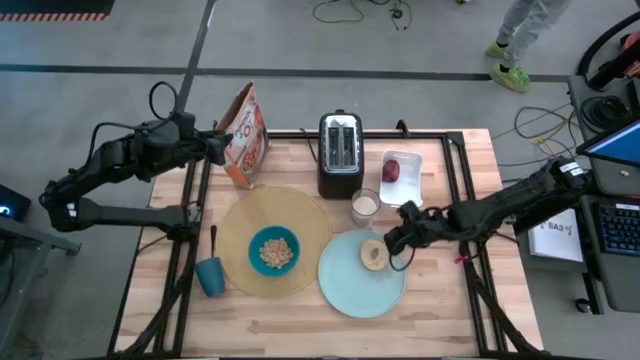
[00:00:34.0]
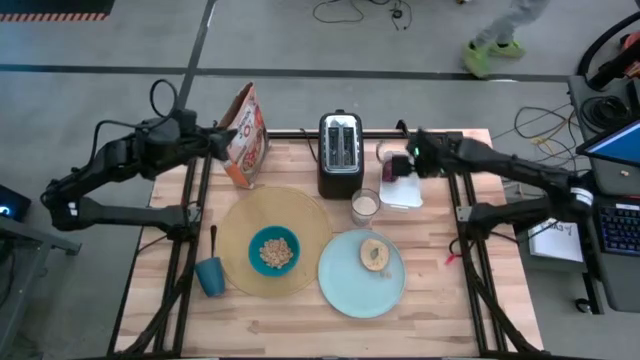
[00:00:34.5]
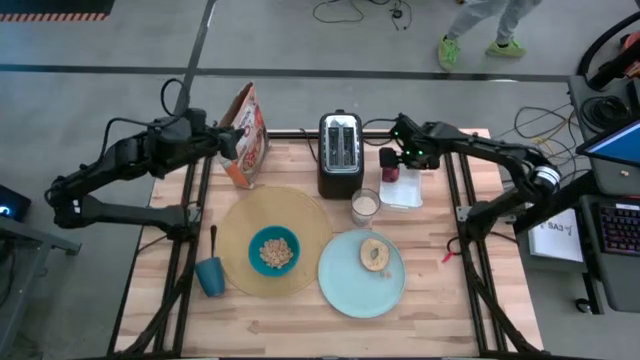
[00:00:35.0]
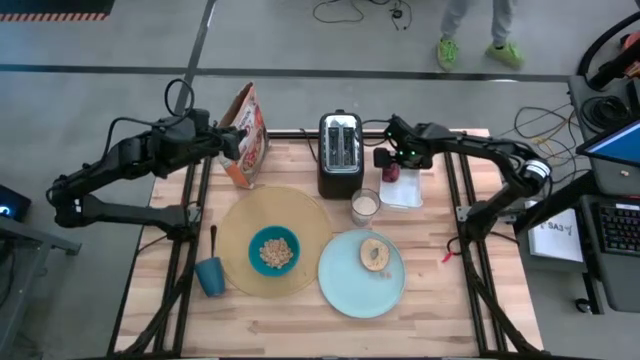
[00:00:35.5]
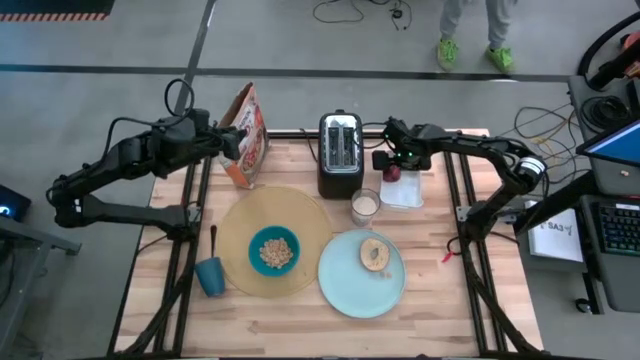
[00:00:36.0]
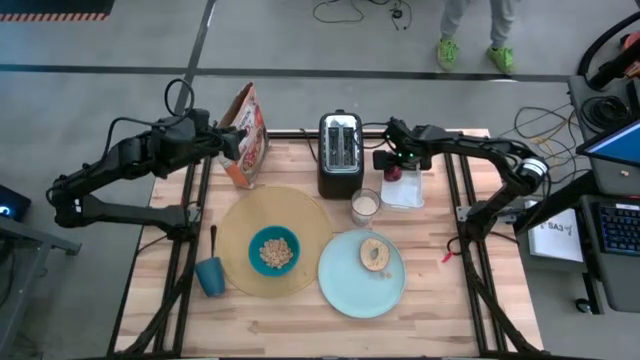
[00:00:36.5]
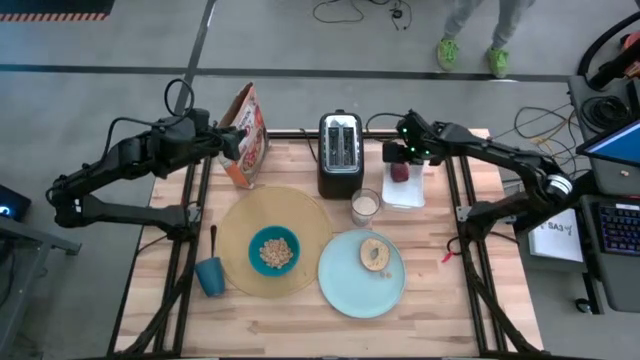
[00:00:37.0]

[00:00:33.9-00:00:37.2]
Task: Arrange a breakfast setting
Put the red apple on the light blue plate

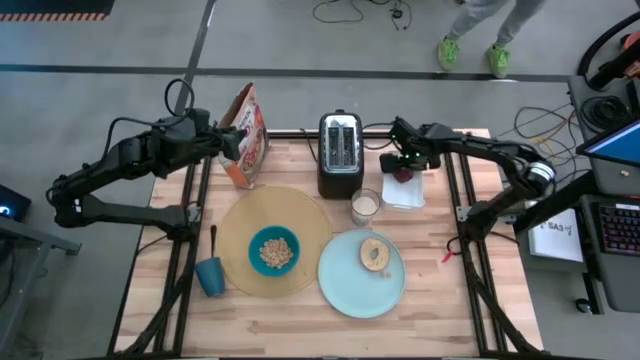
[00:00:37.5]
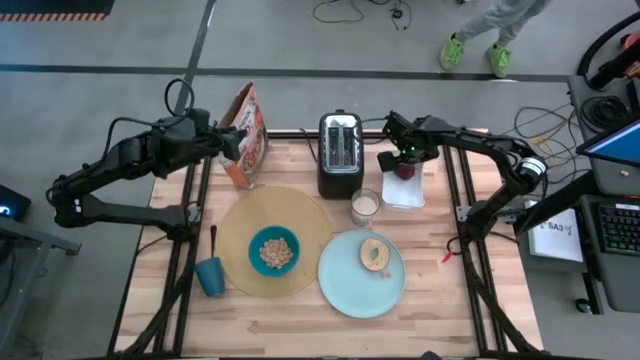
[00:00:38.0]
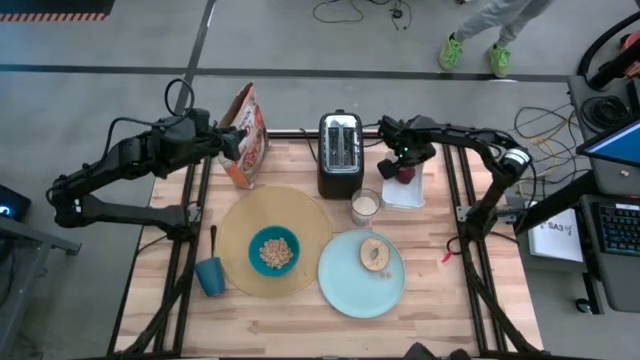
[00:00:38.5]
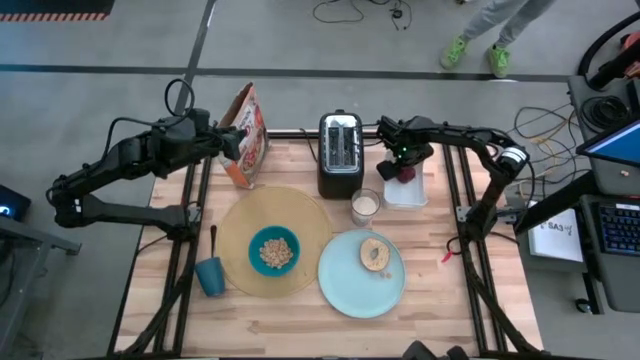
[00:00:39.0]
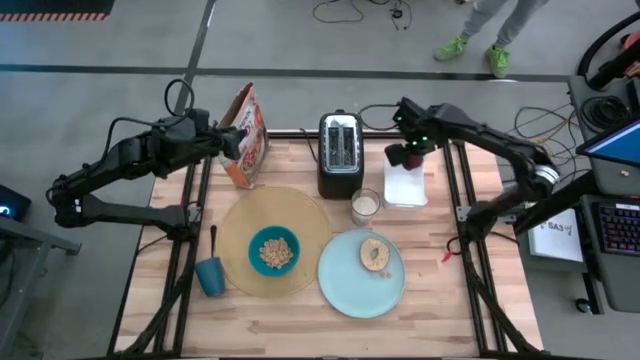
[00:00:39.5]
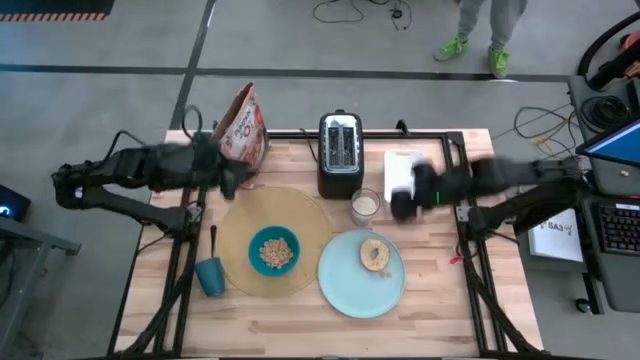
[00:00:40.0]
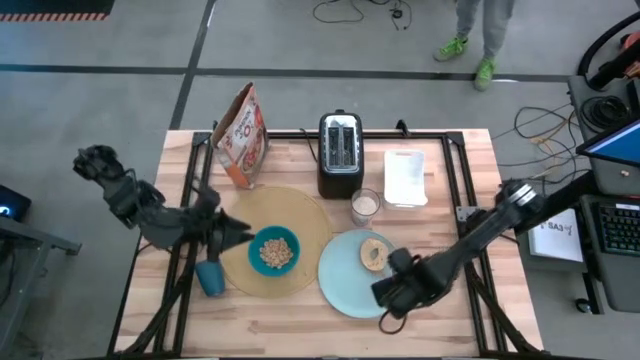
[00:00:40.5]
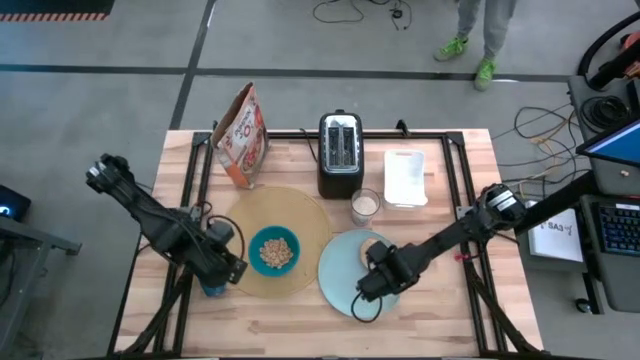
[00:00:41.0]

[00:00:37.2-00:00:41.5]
Put the red apple on the light blue plate

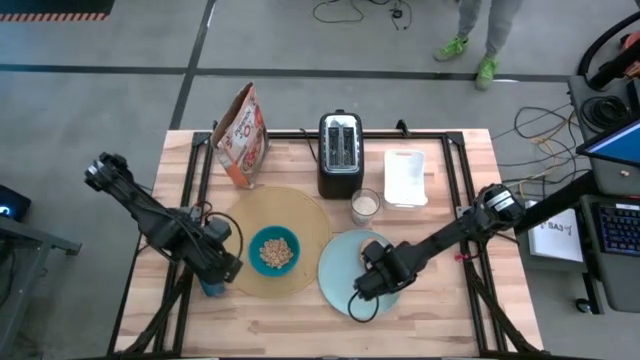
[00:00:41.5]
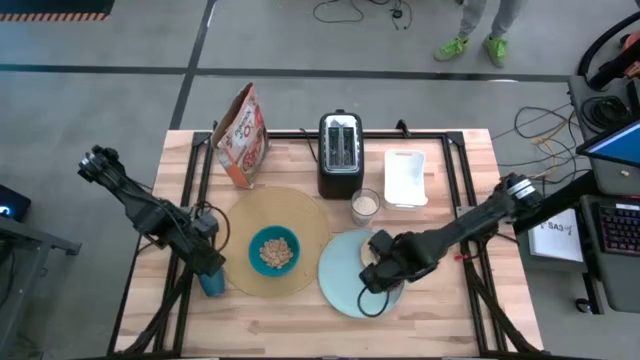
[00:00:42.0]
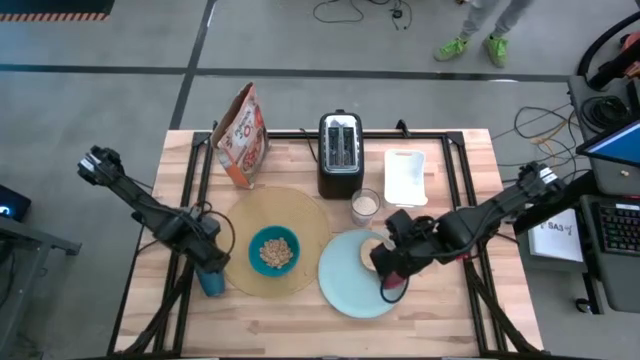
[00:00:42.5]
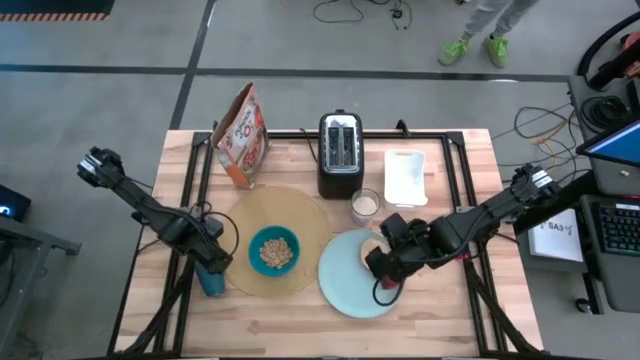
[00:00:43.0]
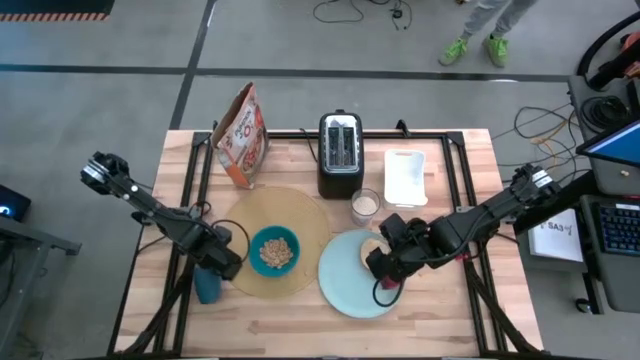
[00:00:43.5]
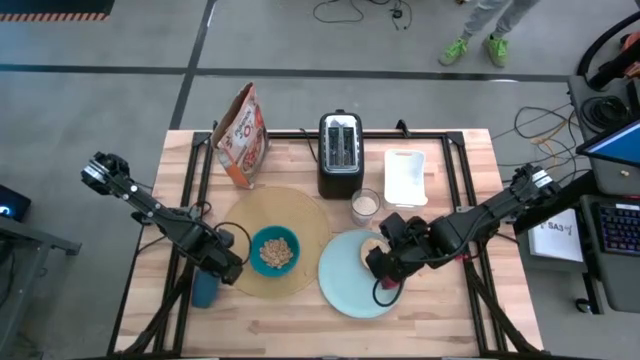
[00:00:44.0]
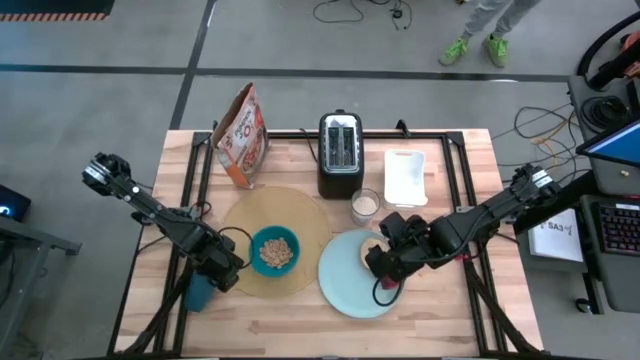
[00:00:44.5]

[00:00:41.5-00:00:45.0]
Adjust the blue cup

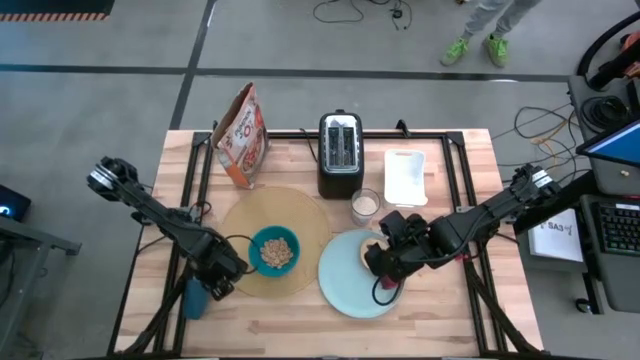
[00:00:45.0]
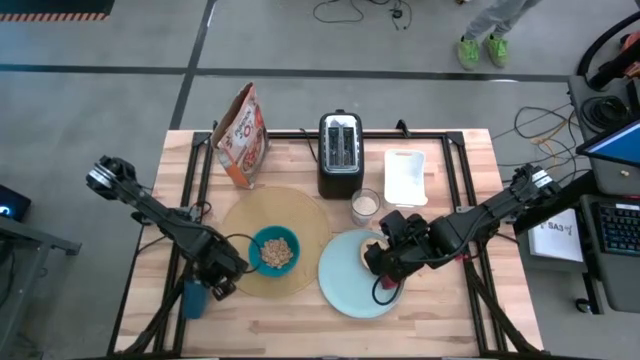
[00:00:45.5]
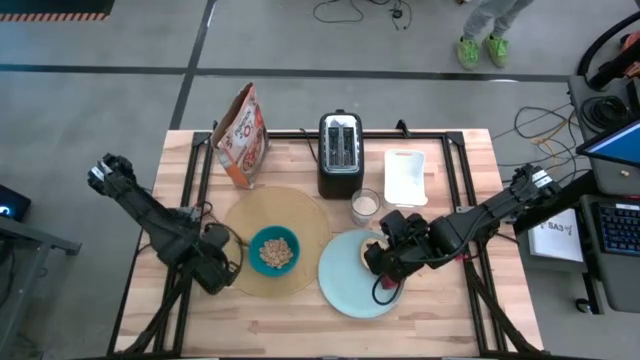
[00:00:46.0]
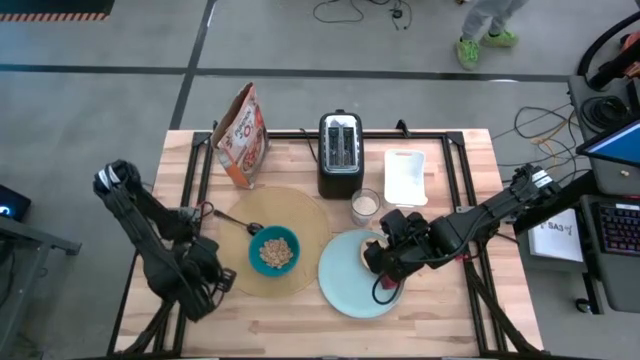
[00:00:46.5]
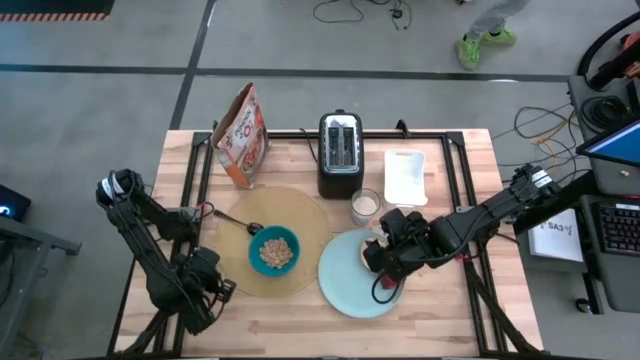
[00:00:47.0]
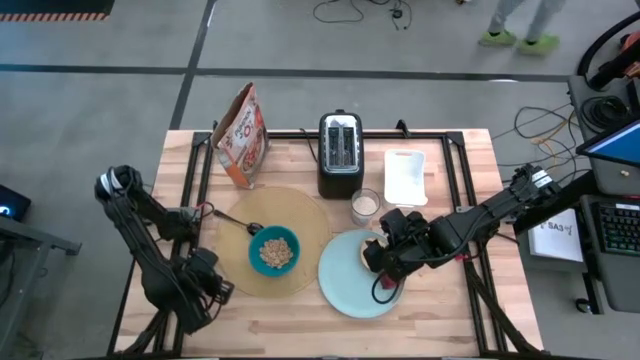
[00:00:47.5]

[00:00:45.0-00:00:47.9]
Adjust the blue cup

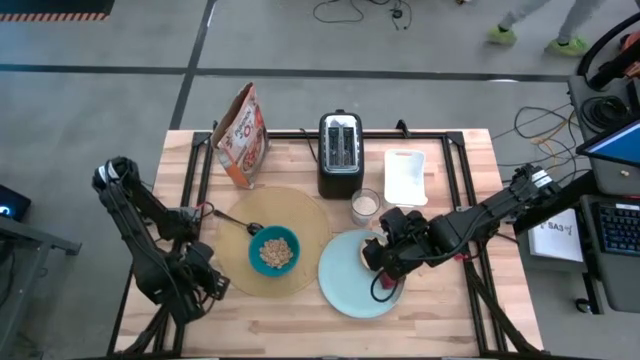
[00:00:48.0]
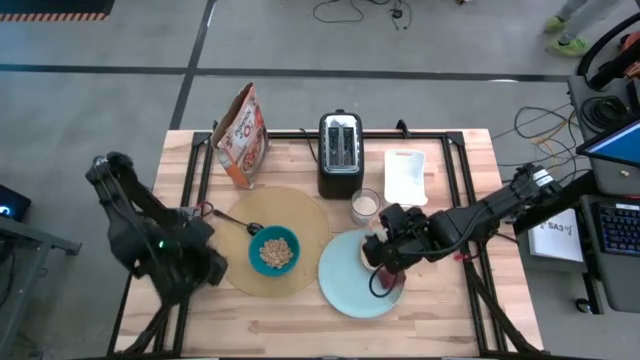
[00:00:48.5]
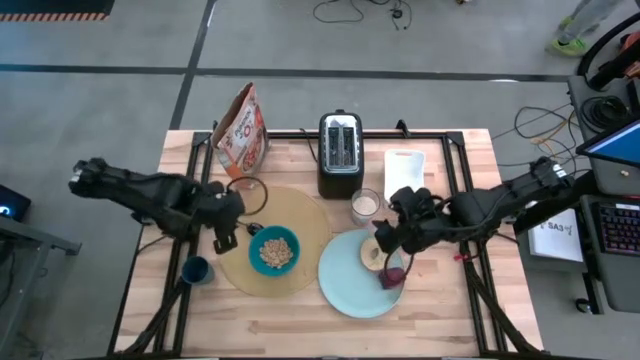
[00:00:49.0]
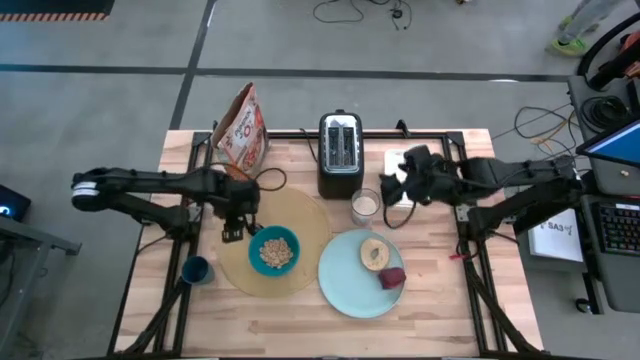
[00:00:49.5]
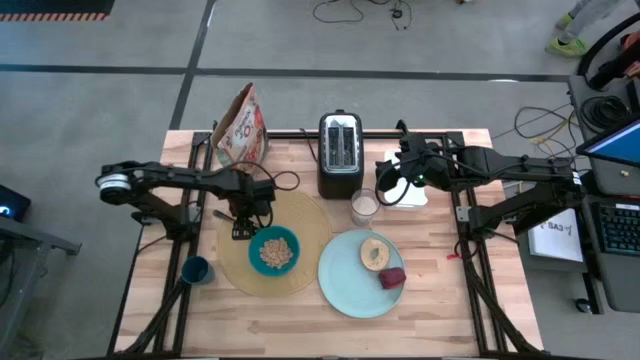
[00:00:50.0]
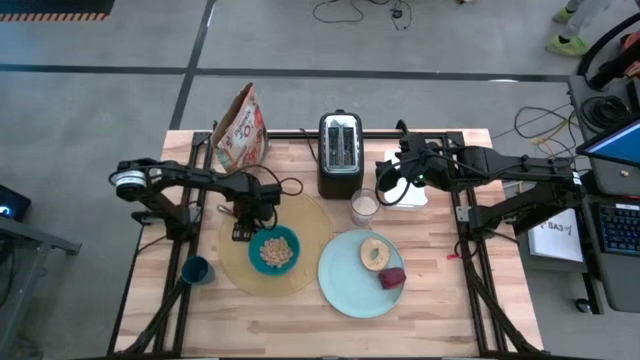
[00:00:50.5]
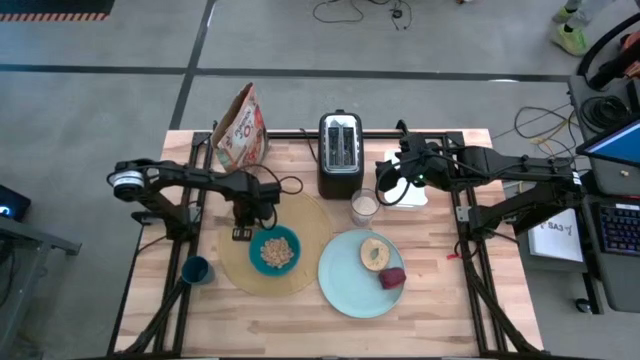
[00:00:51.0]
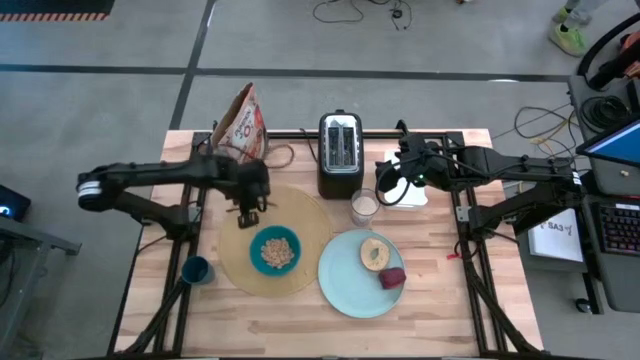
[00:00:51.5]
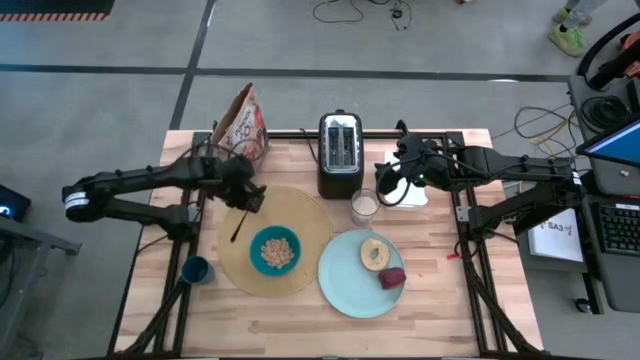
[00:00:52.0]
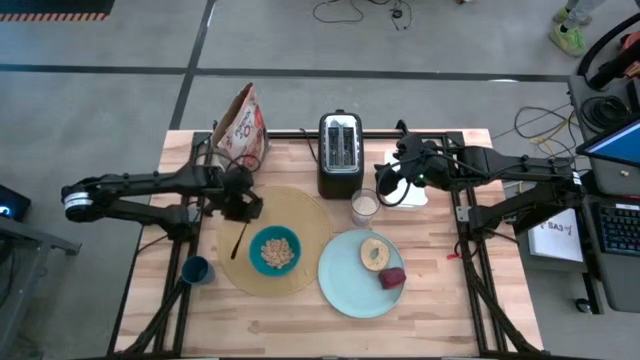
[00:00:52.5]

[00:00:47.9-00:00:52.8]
Put the black spoon on the placemat to the right side of the blue bowl

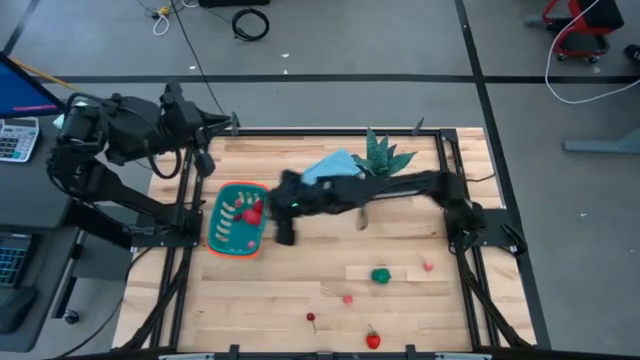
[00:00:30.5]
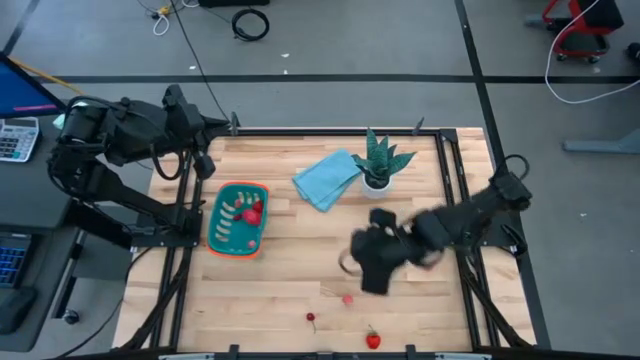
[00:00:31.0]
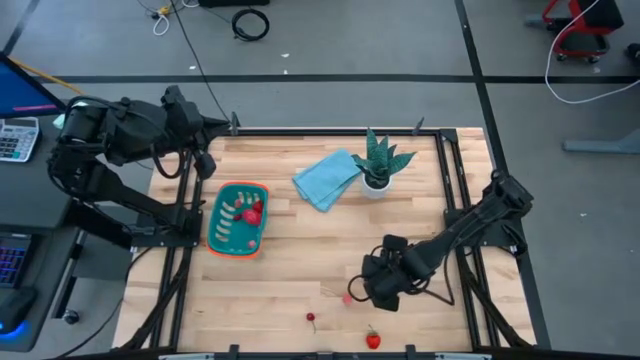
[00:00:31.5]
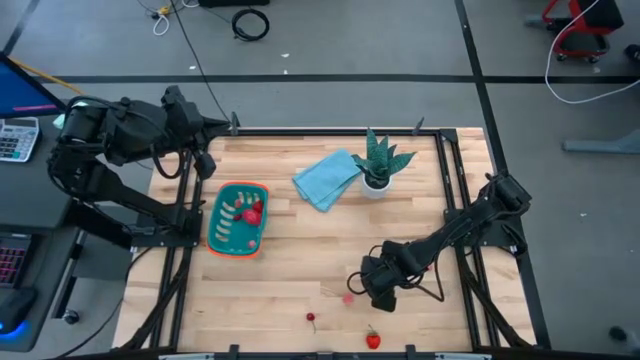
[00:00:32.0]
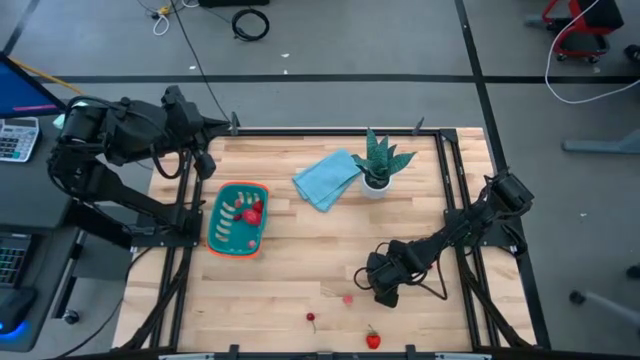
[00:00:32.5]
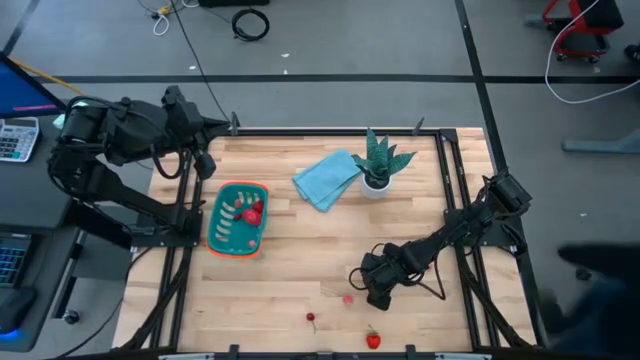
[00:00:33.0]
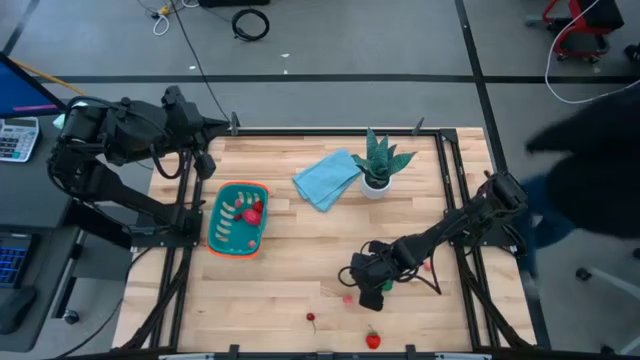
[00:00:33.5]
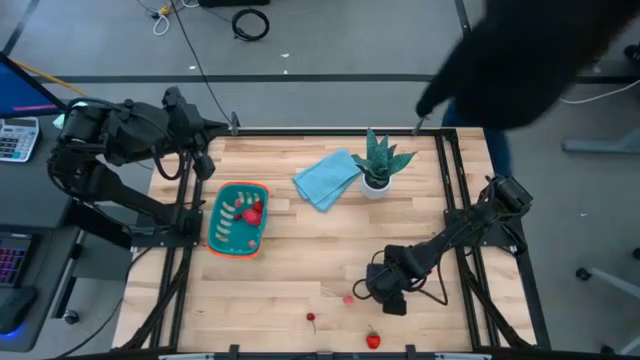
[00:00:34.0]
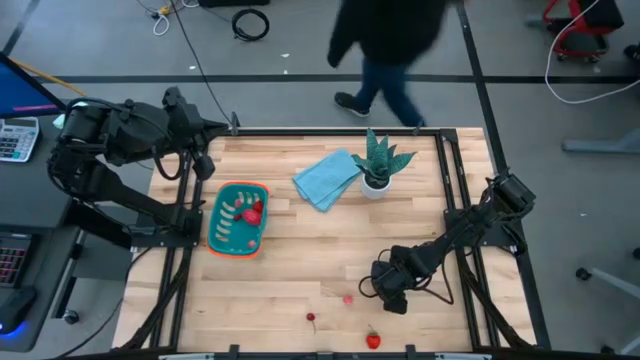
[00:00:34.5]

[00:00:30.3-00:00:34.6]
Task: Pick and placing Produce into tupperware
Put the bell pepper into the blue basket
